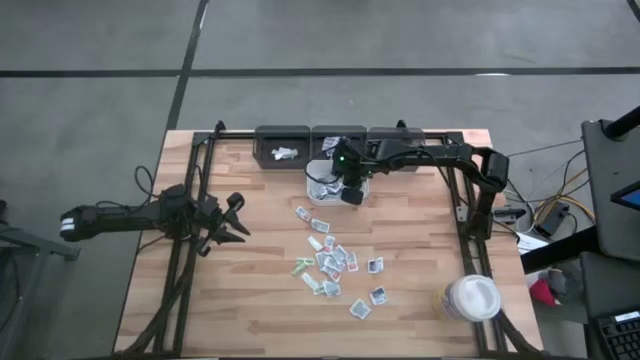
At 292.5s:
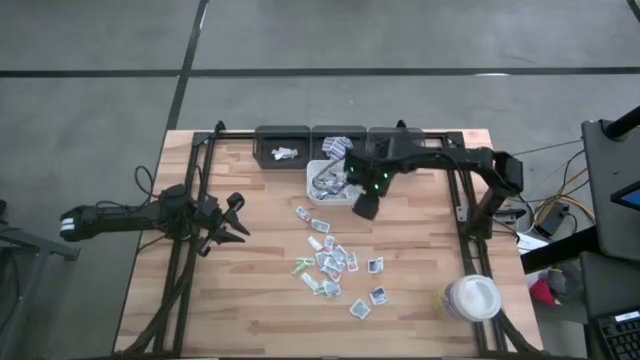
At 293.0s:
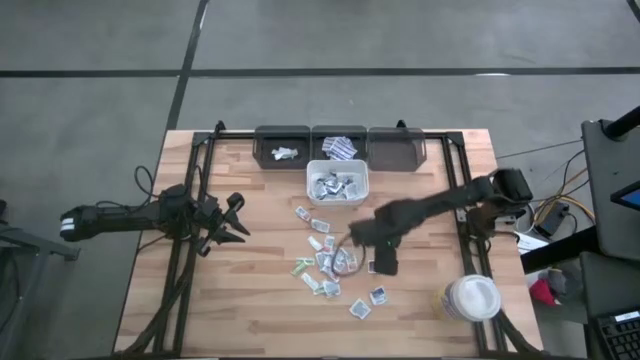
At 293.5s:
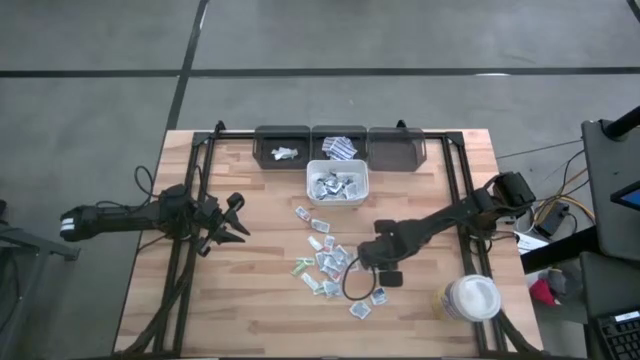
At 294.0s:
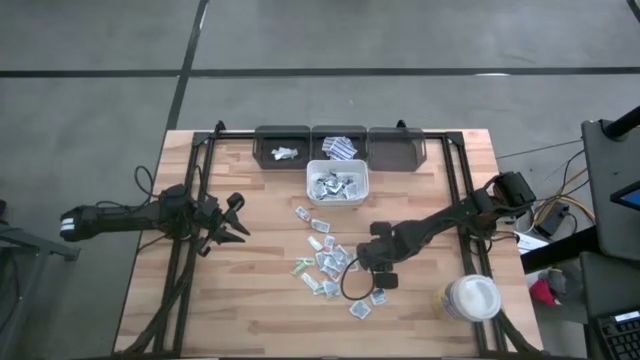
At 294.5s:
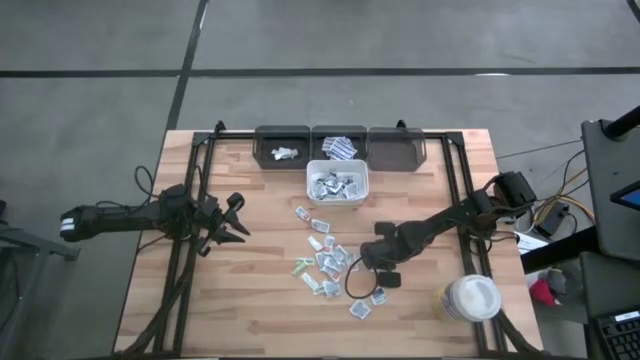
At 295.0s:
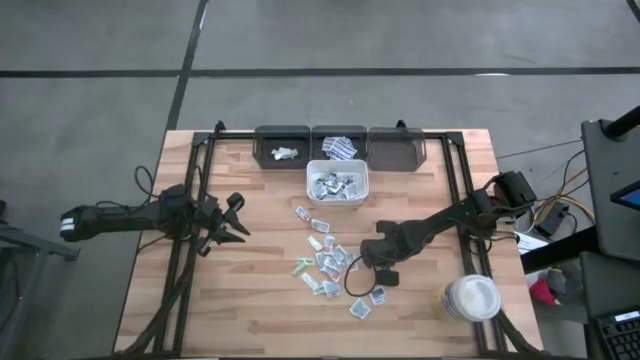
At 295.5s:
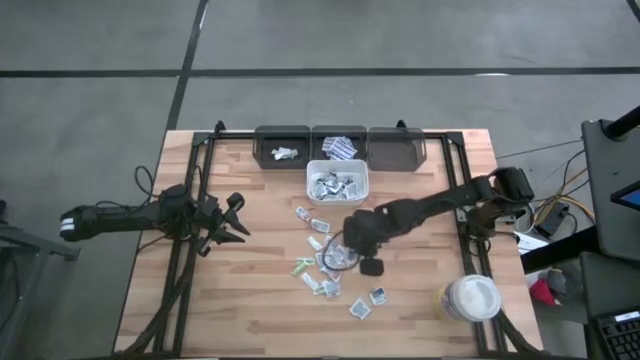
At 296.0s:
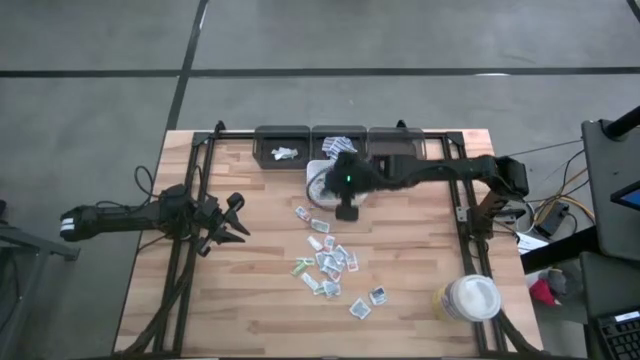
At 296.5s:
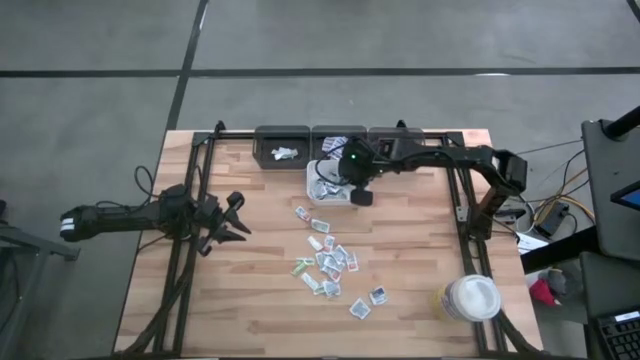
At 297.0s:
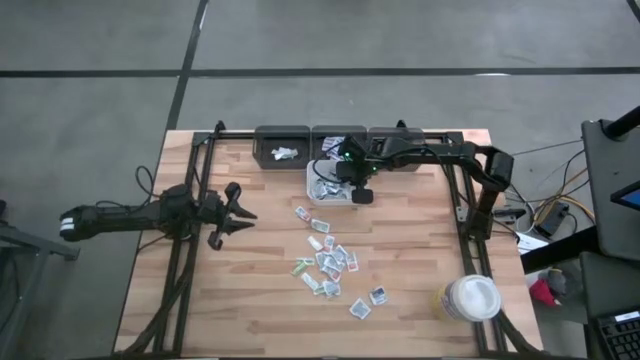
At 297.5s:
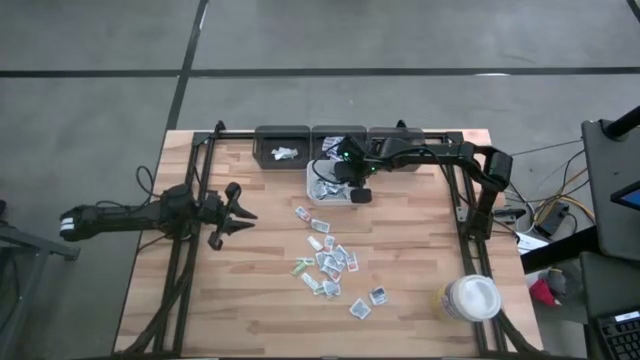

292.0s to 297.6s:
Task: Pick & Place First Aid Supplies
Put the blue alcohol pad into the white bin

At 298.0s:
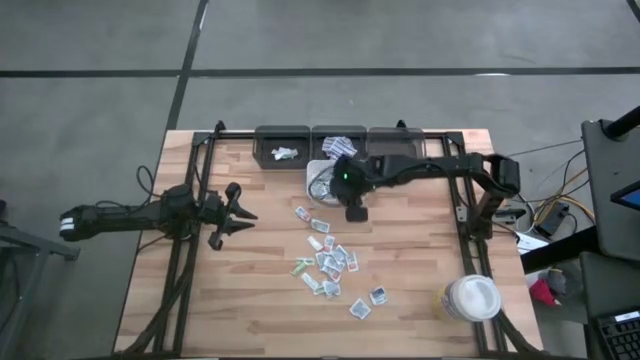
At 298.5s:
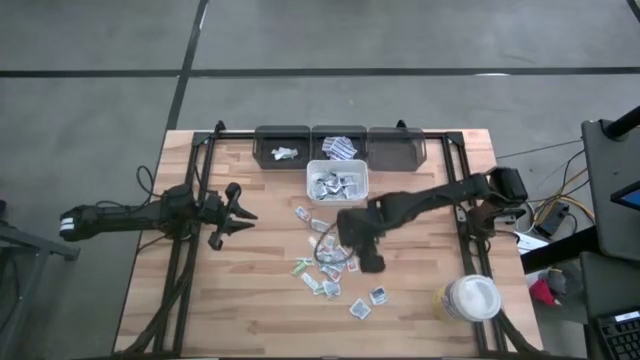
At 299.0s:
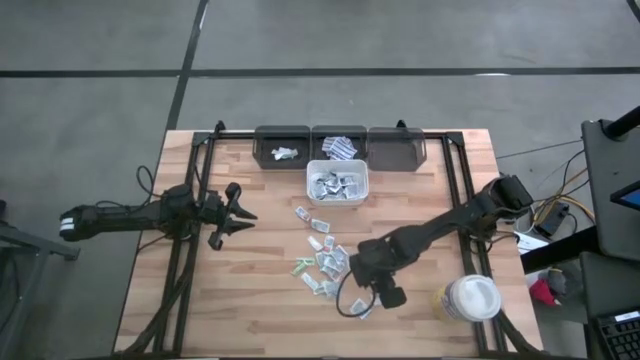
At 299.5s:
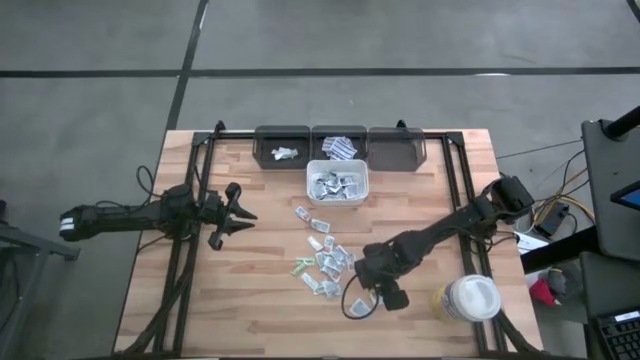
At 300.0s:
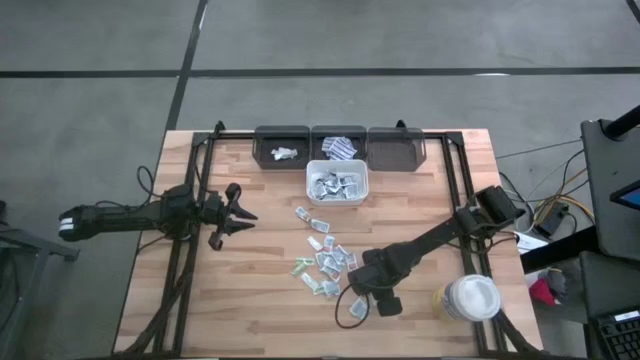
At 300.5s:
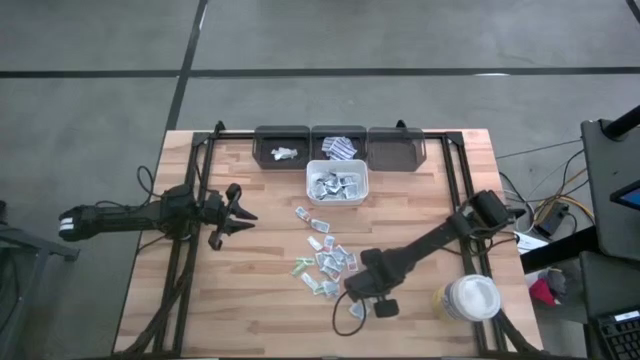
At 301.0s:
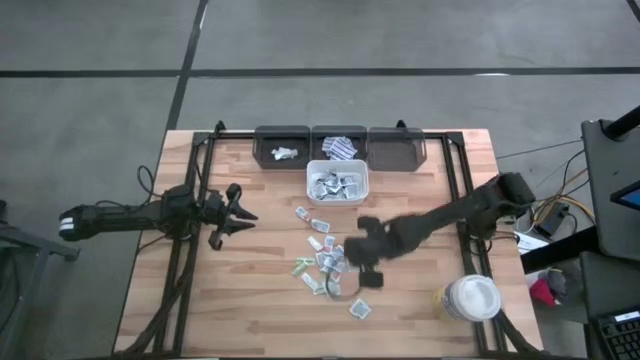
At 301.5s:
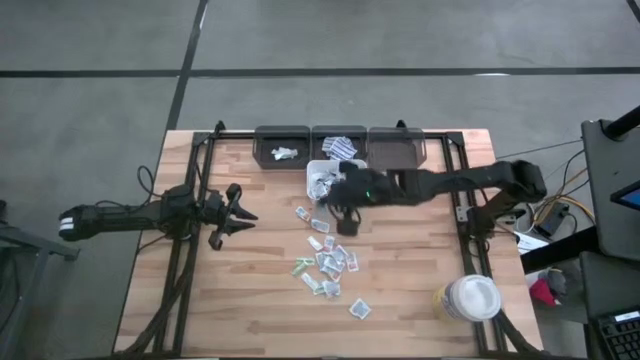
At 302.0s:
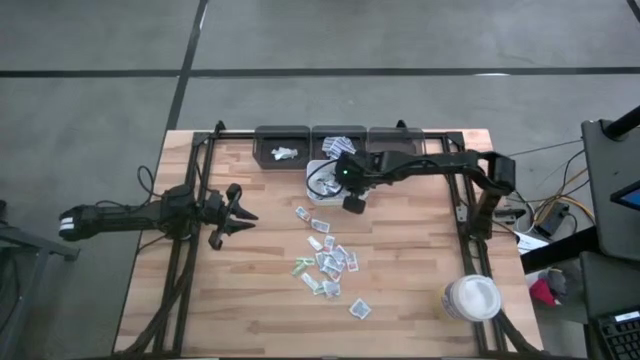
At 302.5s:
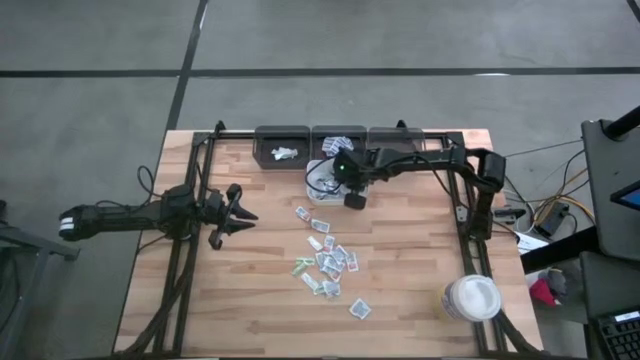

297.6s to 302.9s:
Put the blue alcohol pad into the white bin

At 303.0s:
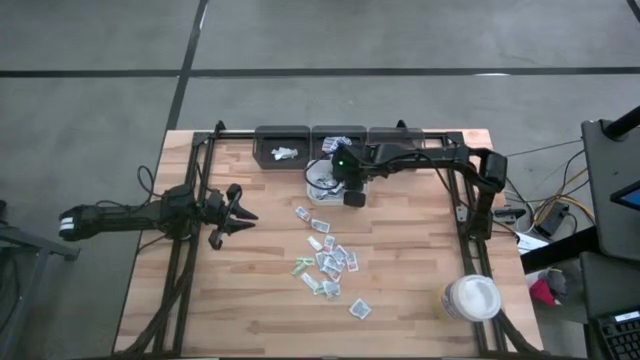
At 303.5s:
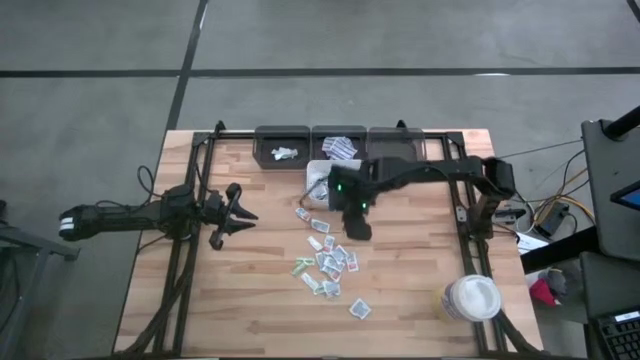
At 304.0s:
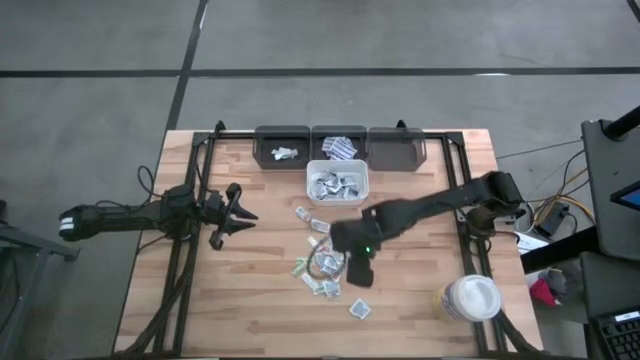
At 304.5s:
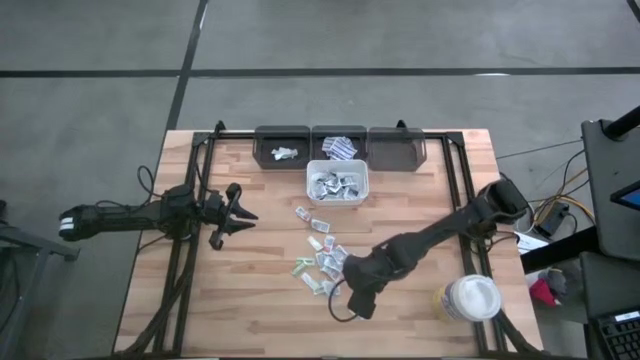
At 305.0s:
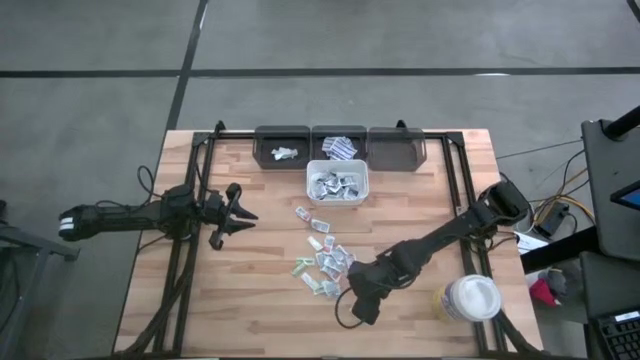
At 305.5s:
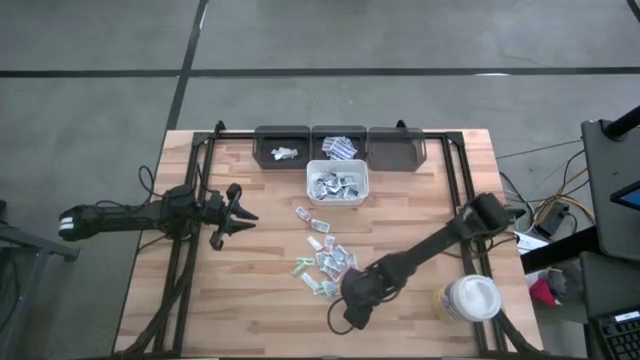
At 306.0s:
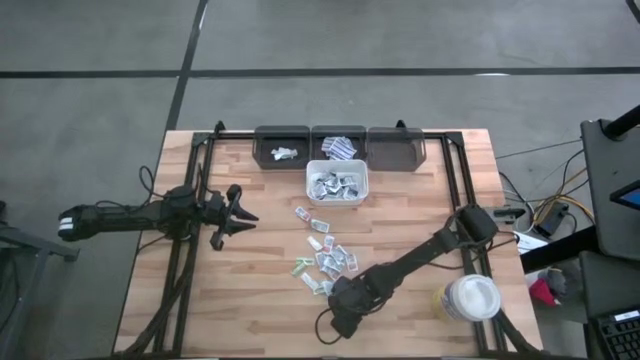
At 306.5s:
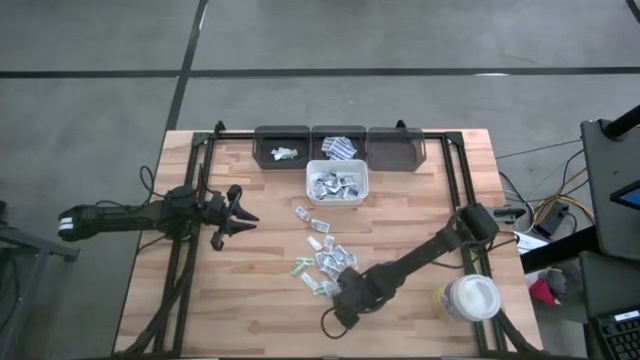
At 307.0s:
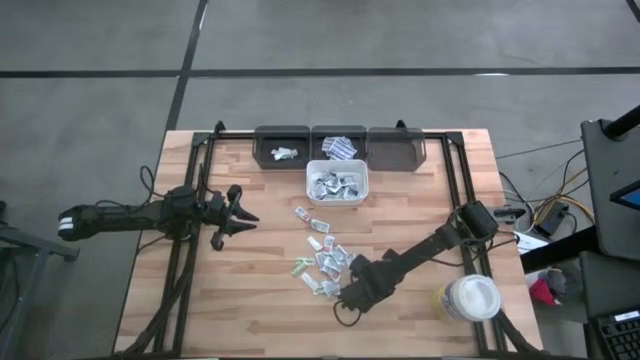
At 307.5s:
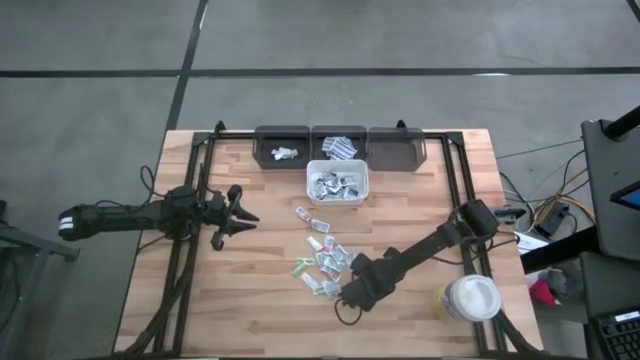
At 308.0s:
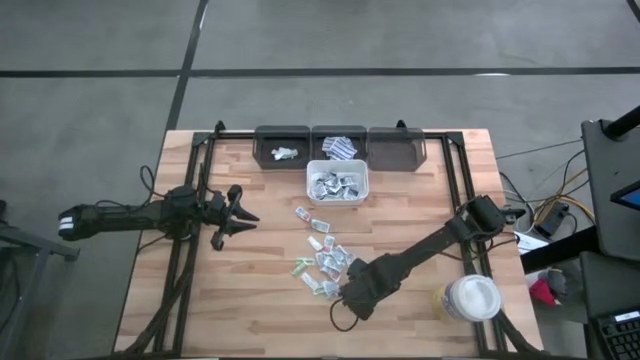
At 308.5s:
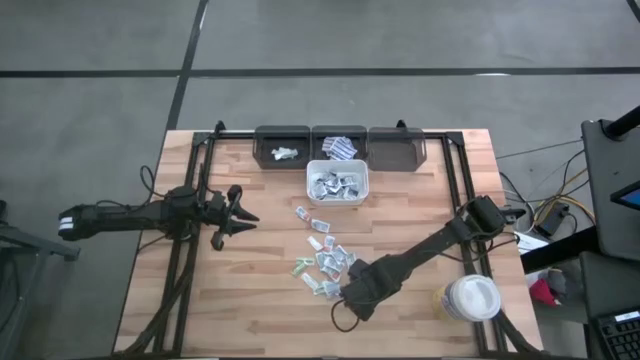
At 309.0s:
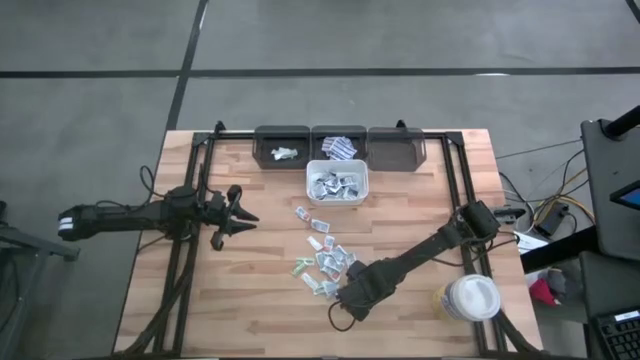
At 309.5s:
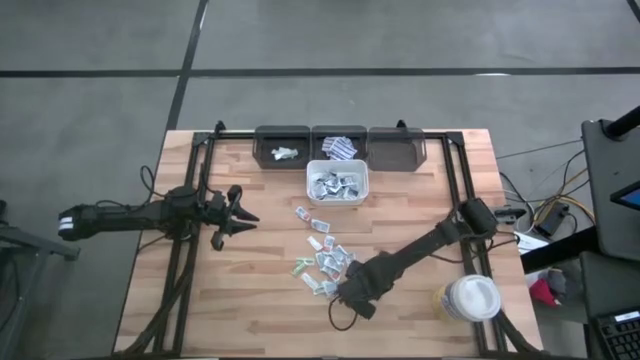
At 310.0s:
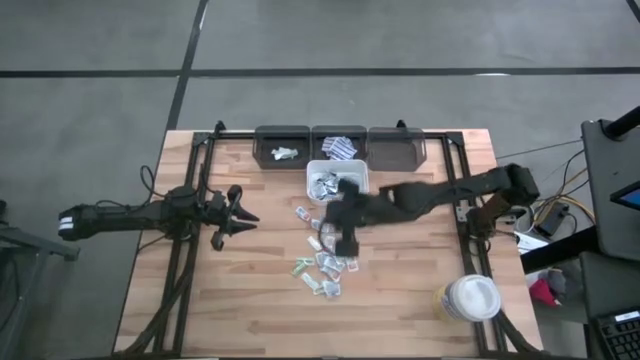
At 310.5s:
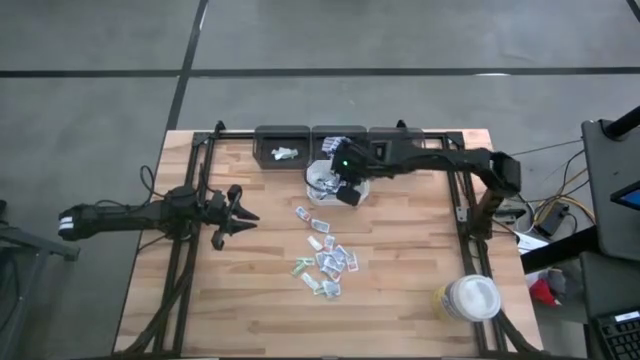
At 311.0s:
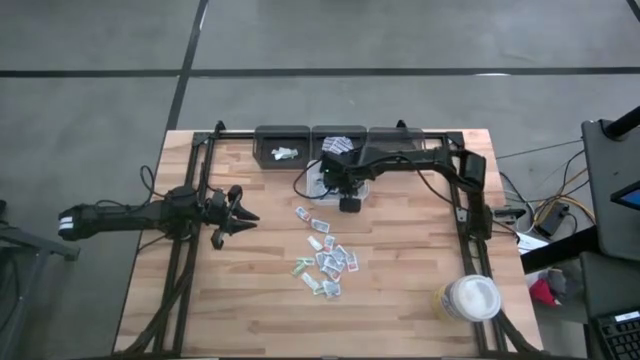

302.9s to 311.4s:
Put the blue alcohol pad into the white bin

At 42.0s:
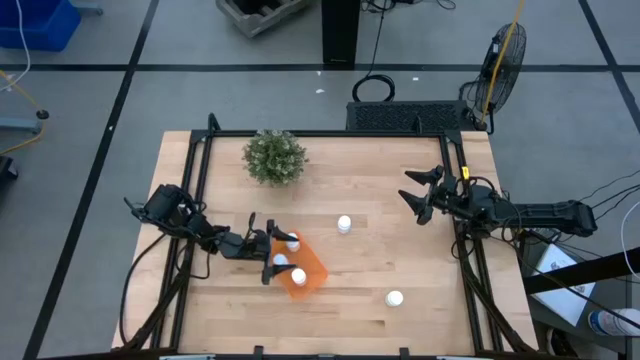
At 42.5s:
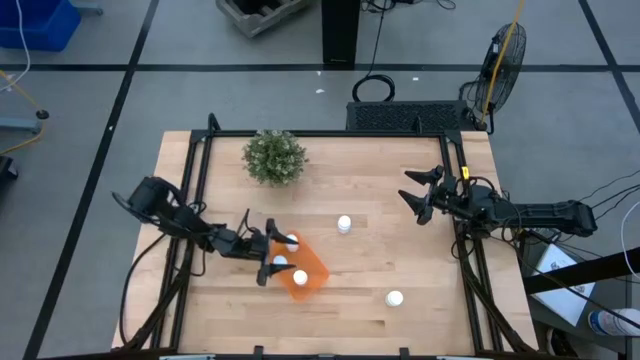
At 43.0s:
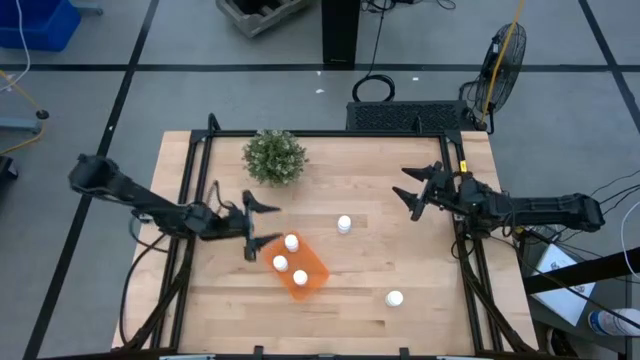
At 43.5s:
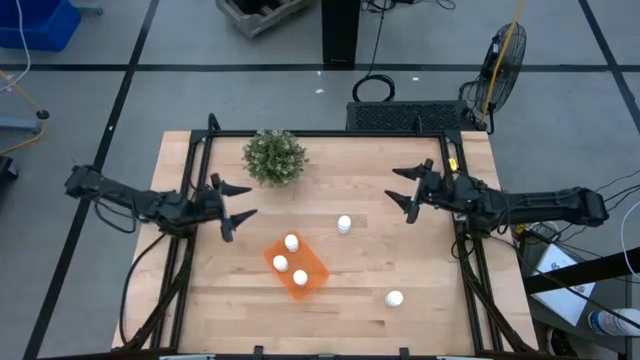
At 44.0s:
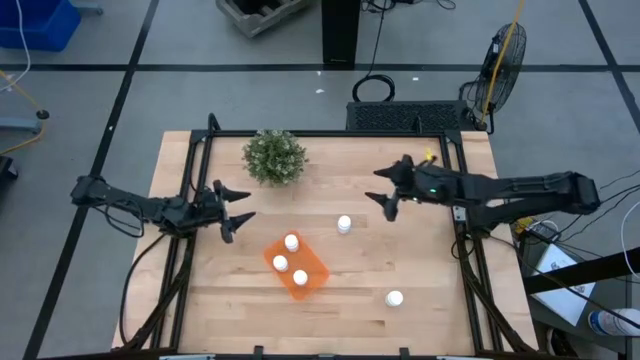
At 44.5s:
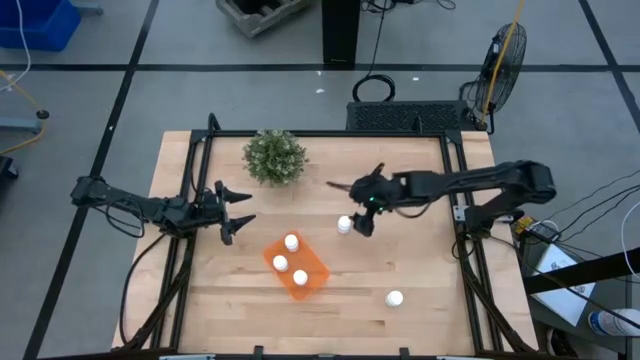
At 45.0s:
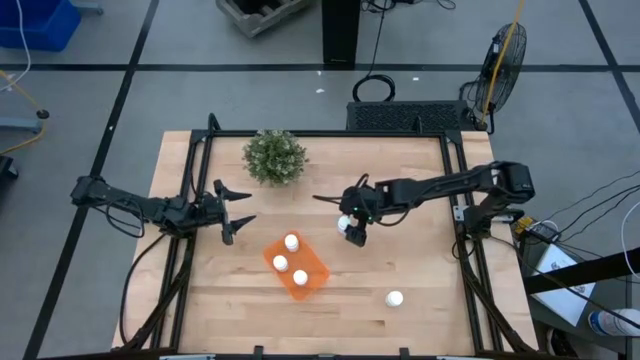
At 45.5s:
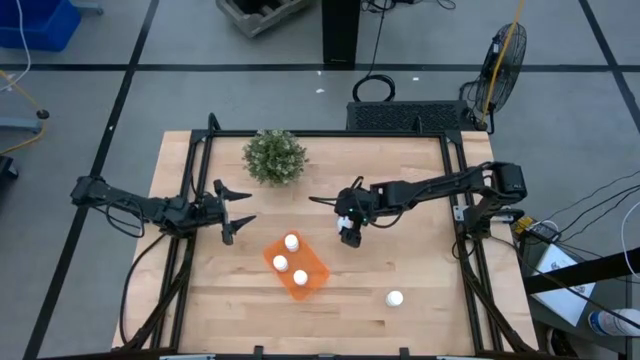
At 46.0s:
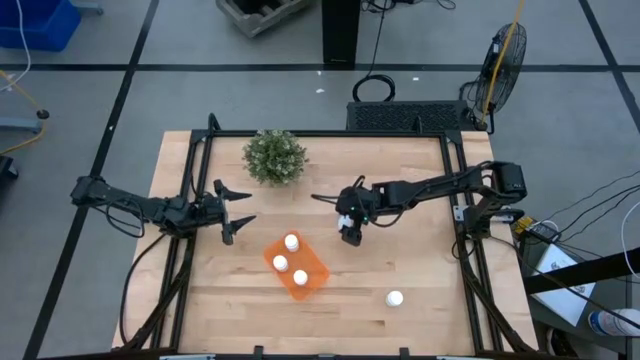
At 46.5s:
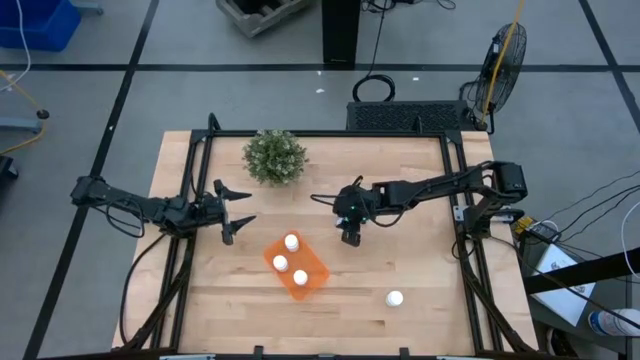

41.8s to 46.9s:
Task: Pick and place pill bottles into a basket
Put the white medicine bottle into the orange bin
